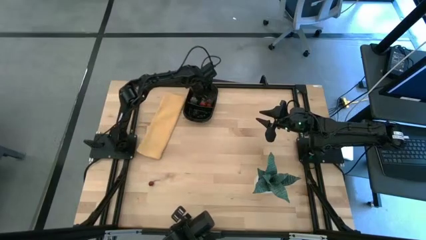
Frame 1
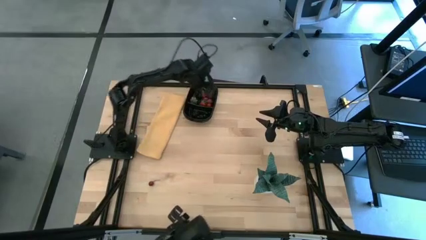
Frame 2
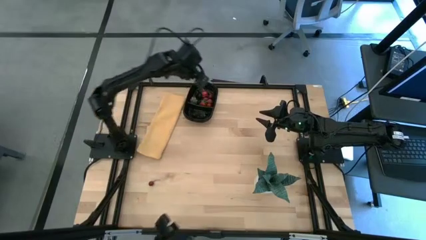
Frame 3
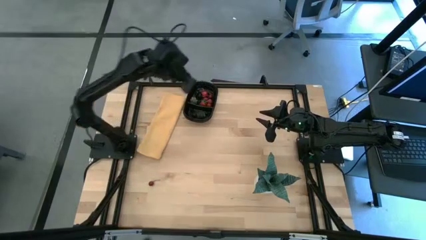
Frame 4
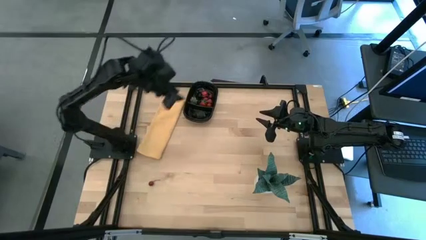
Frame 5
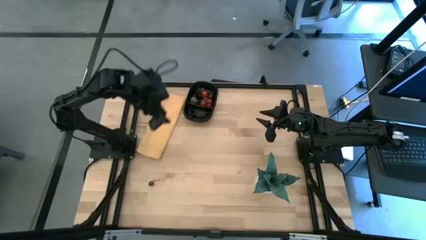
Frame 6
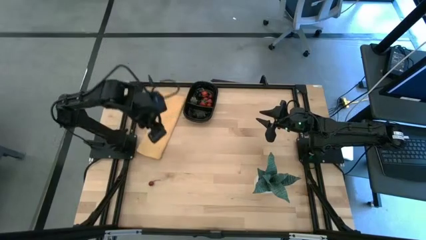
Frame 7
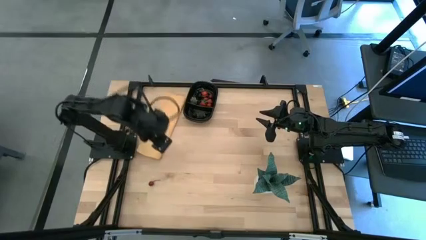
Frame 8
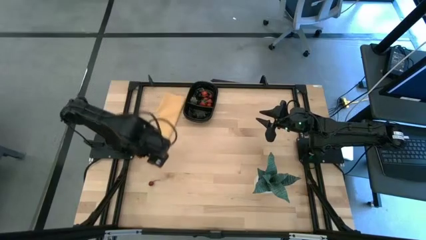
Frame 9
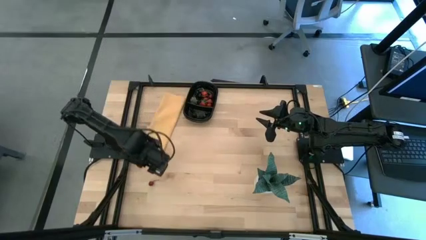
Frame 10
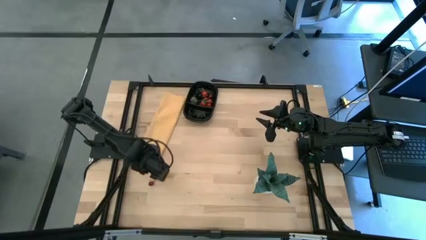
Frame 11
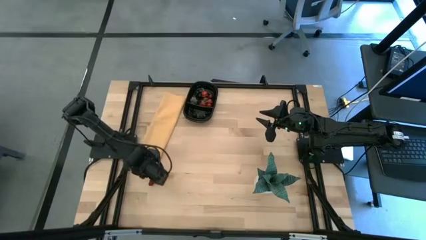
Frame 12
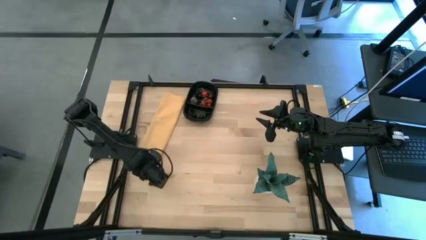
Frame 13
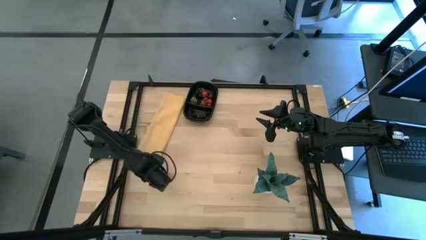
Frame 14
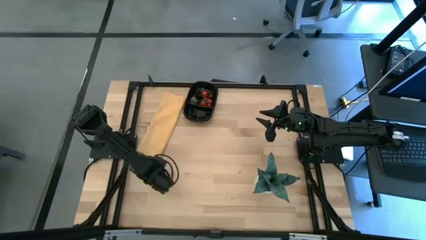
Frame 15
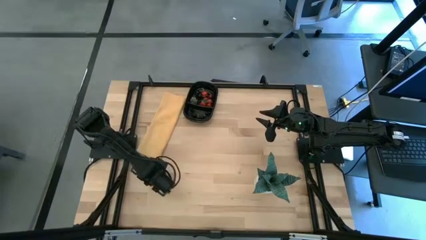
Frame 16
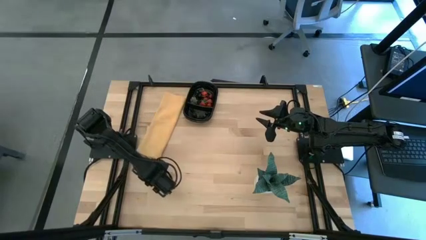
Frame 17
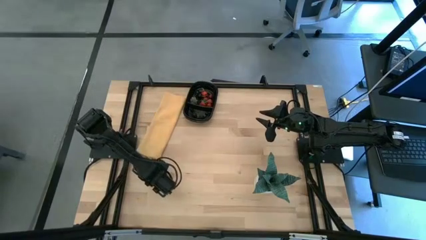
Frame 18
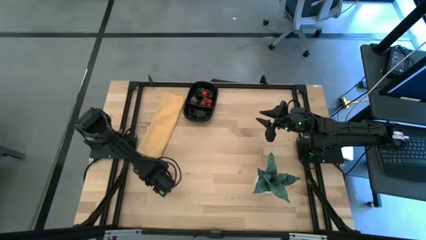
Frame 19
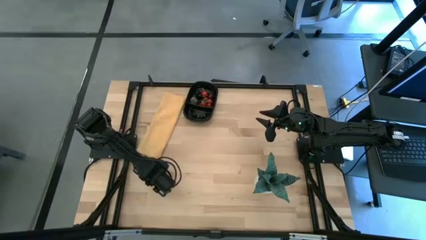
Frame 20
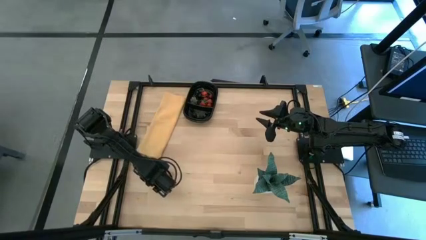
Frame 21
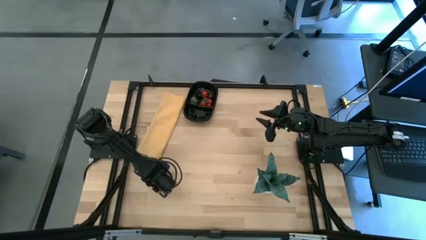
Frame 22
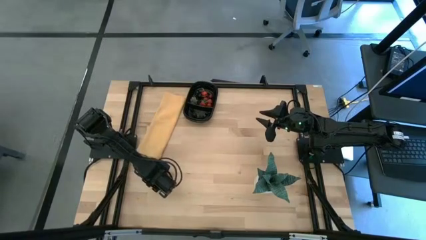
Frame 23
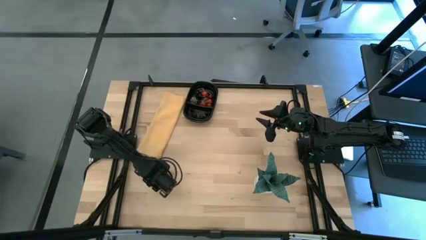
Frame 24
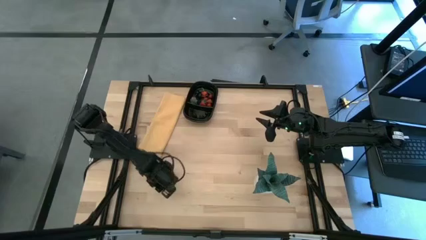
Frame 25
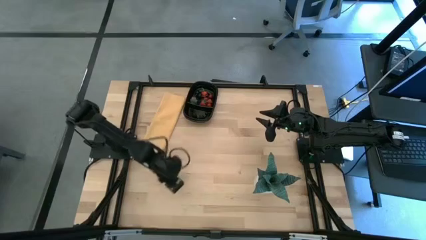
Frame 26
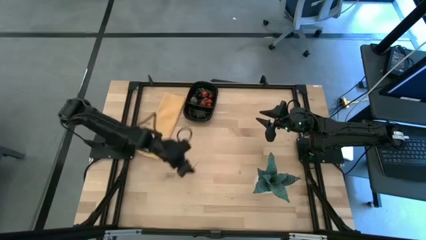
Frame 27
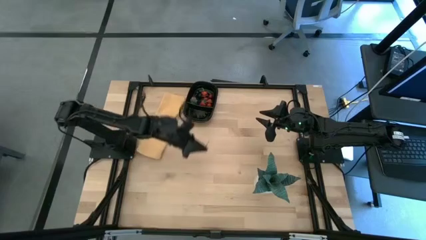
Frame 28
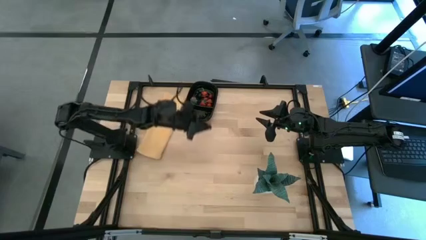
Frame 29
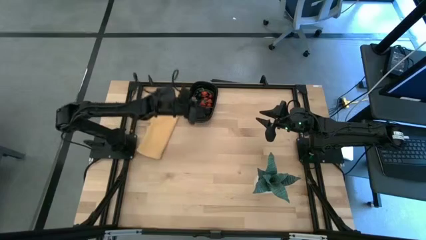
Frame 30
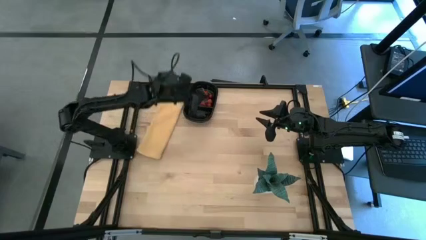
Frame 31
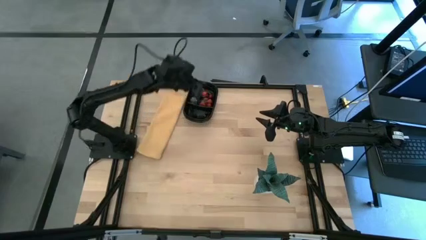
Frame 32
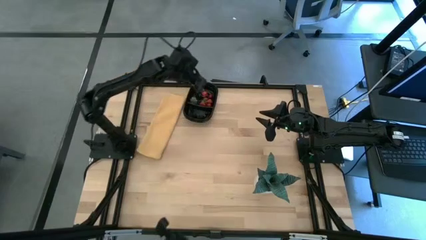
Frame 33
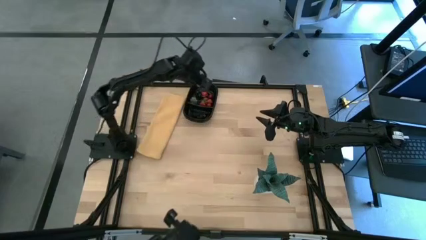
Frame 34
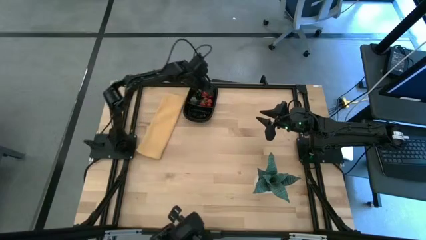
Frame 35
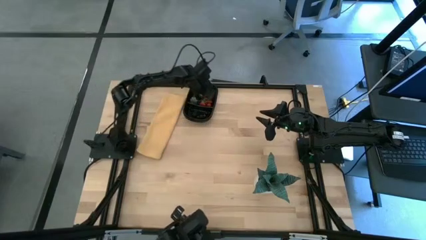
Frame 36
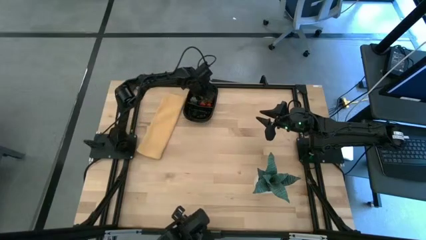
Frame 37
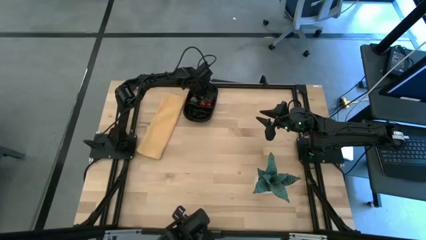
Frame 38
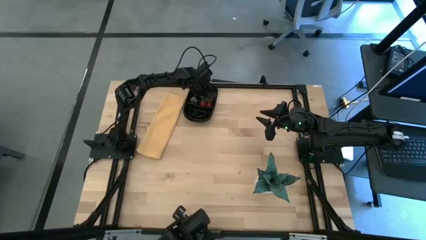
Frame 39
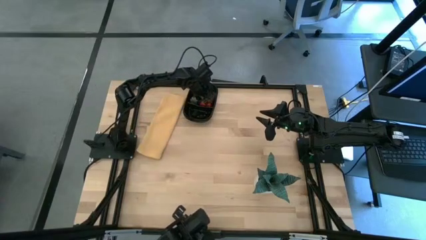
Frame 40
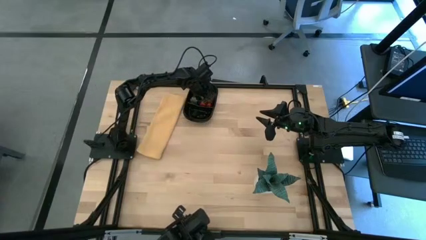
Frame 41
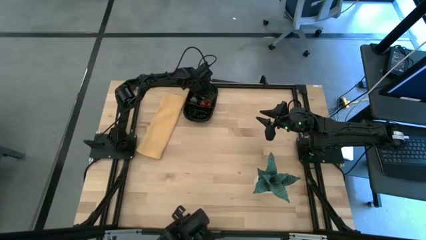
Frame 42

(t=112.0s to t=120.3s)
Task: Pick and placing Produce into tupperware
Put the red cherry into the black bin

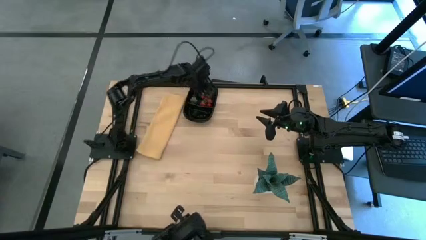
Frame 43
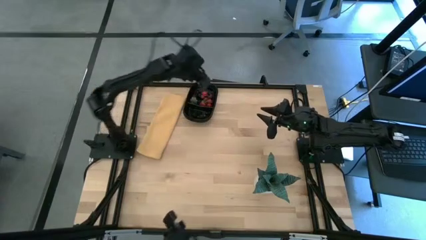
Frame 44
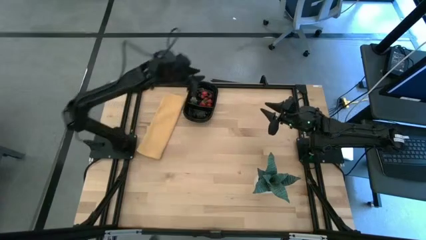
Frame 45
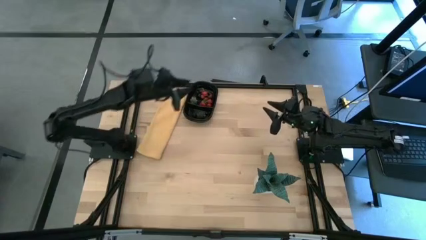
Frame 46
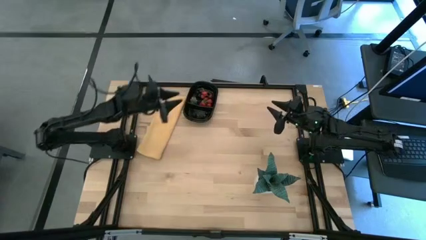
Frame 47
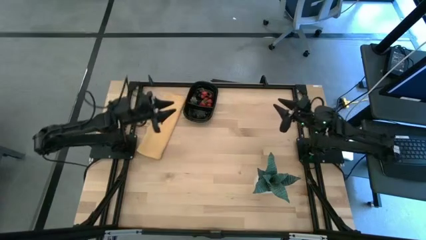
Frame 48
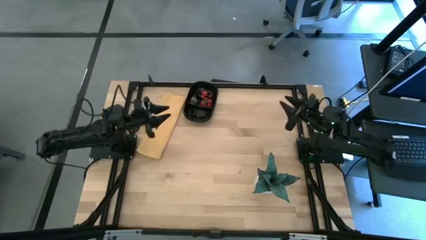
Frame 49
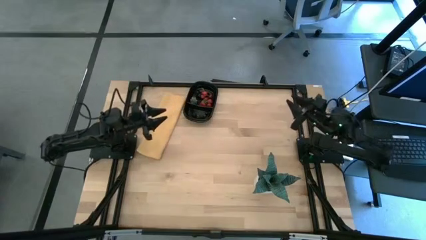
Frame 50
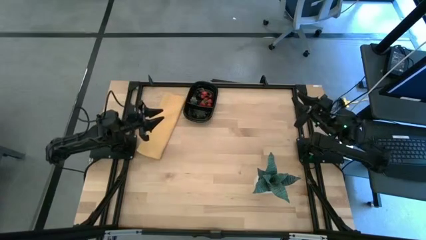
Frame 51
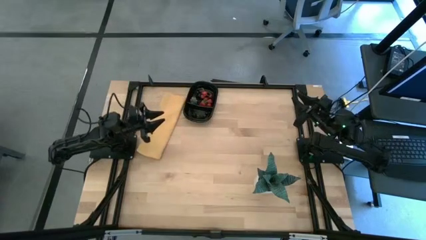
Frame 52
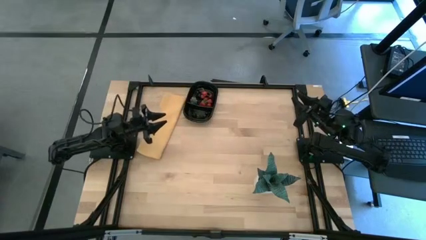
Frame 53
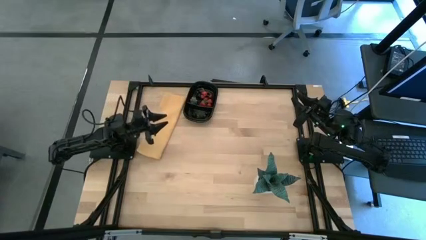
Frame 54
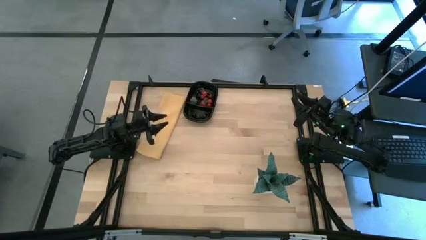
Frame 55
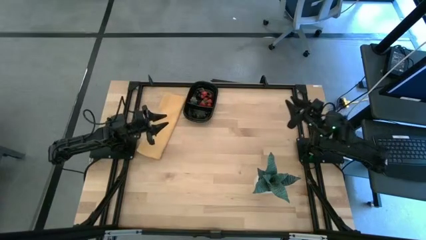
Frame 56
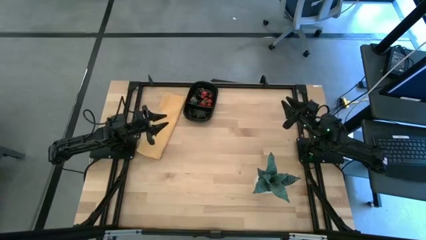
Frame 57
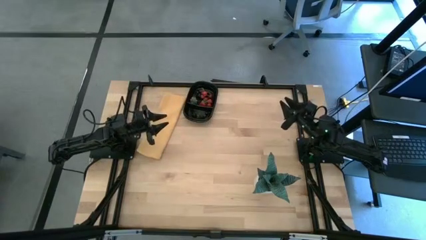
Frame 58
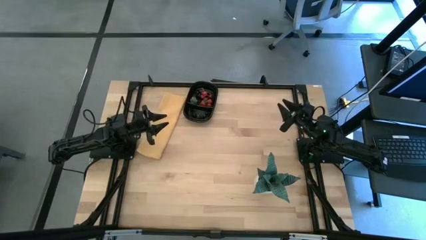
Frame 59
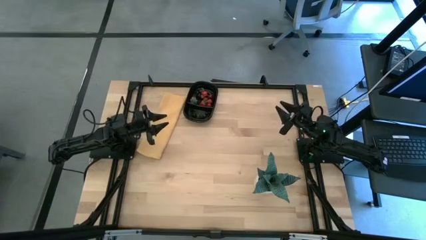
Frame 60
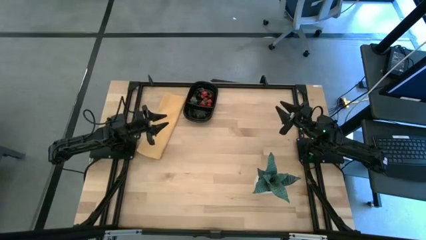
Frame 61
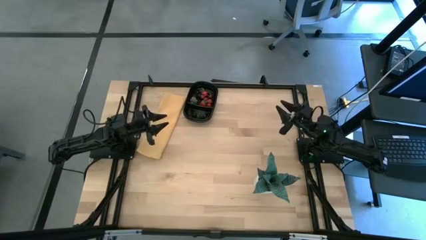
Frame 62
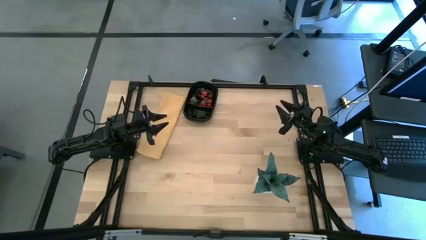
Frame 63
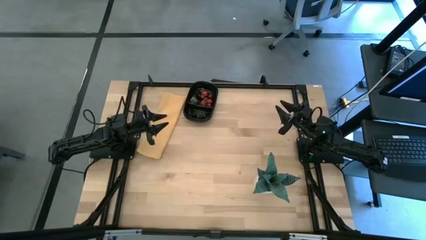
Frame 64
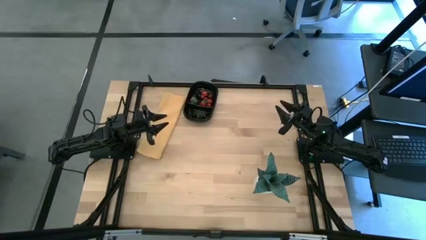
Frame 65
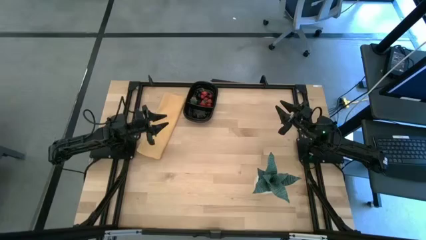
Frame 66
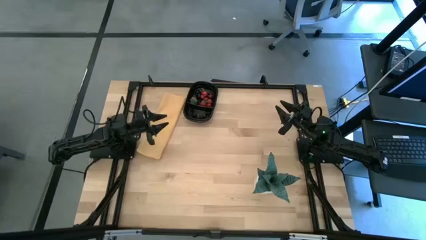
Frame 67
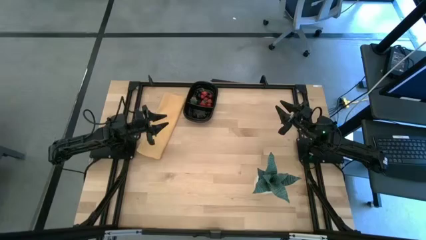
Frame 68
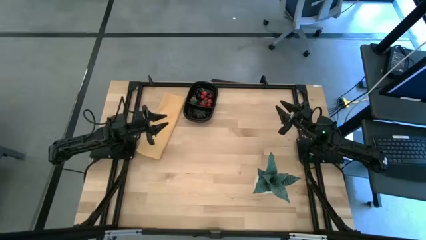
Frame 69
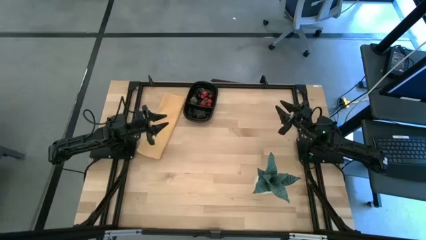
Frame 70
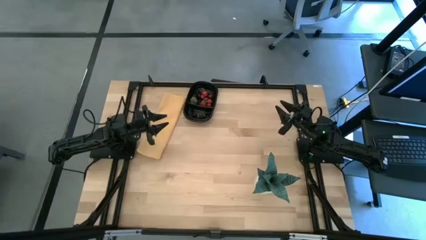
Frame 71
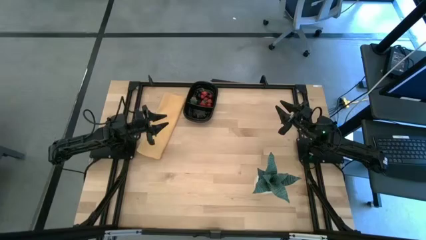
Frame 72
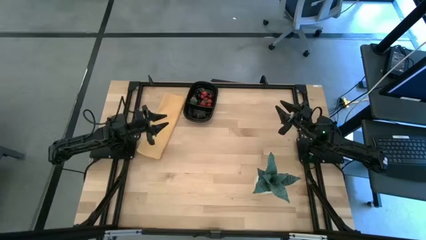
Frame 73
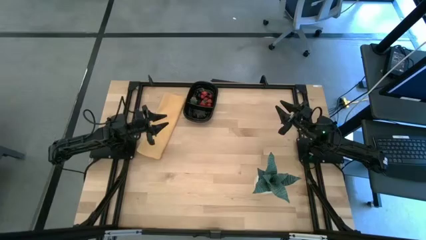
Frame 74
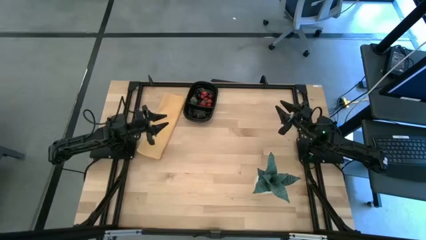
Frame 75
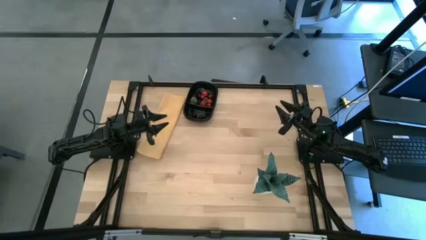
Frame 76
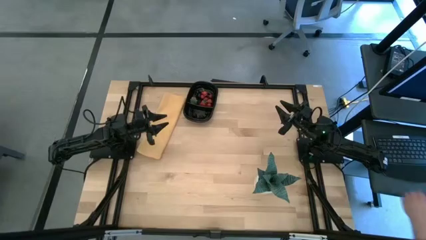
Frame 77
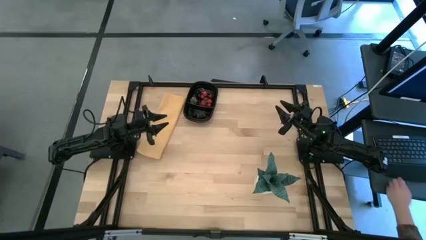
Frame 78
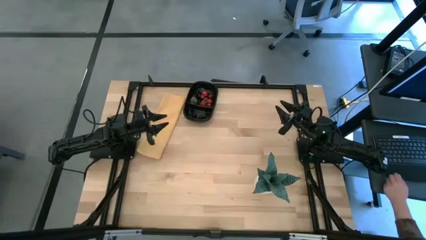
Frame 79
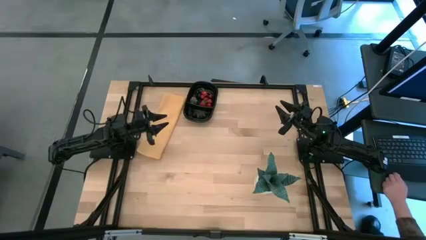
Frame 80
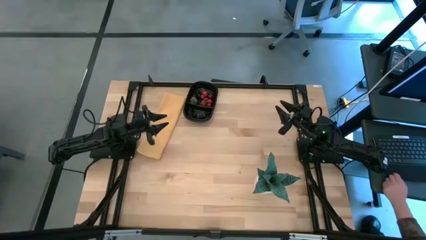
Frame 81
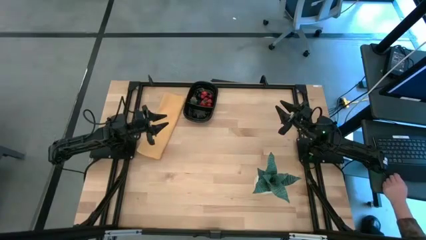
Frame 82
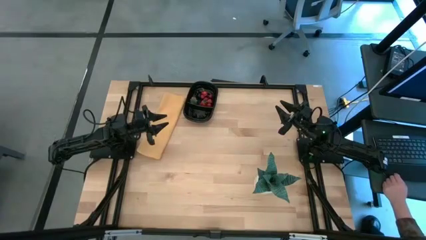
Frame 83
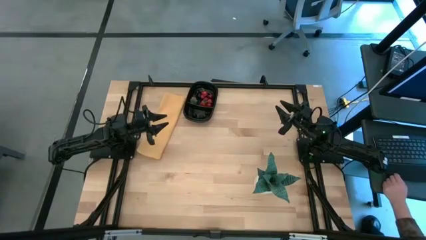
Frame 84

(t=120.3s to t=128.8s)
Return to Home Position
